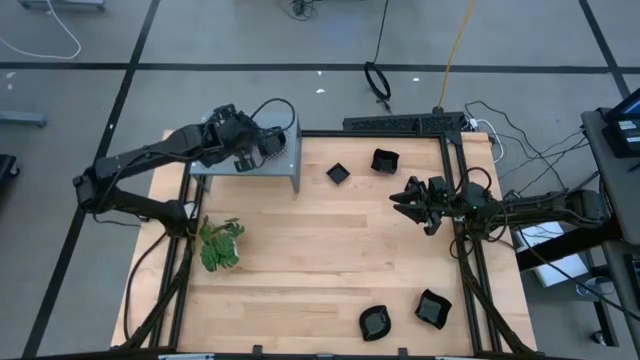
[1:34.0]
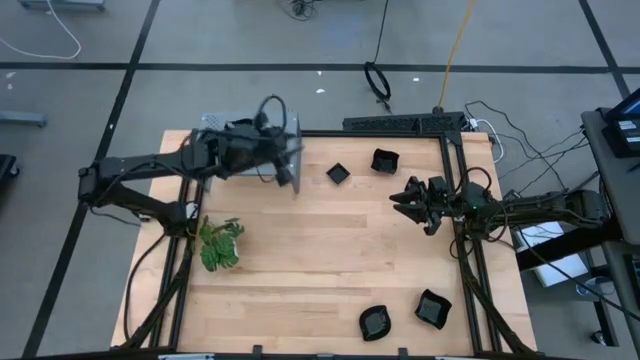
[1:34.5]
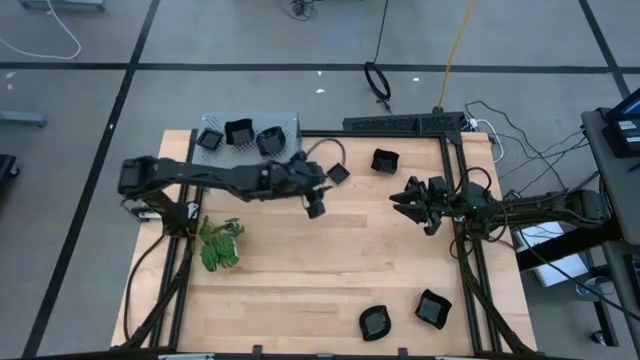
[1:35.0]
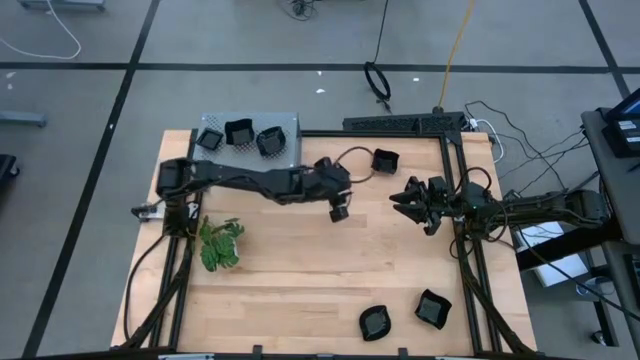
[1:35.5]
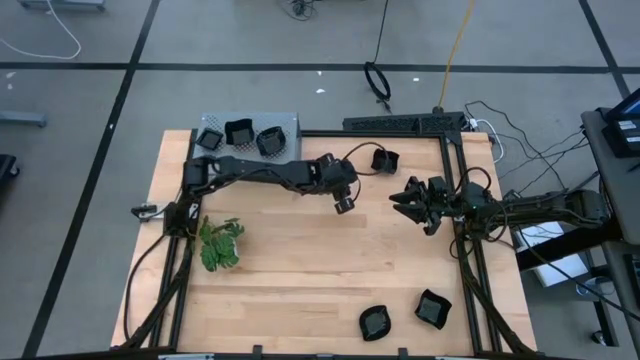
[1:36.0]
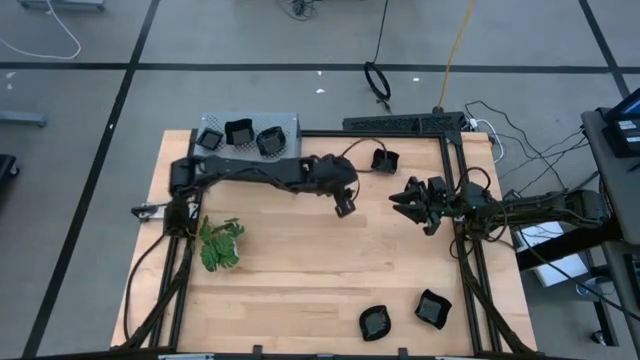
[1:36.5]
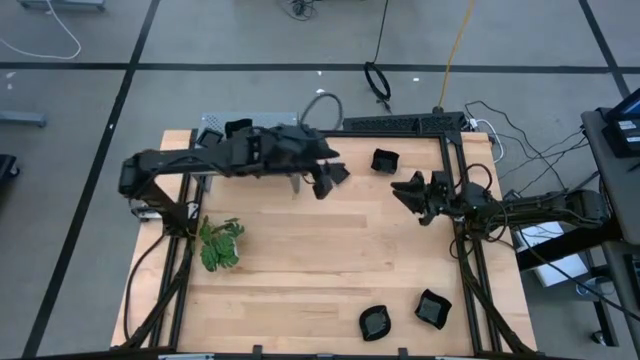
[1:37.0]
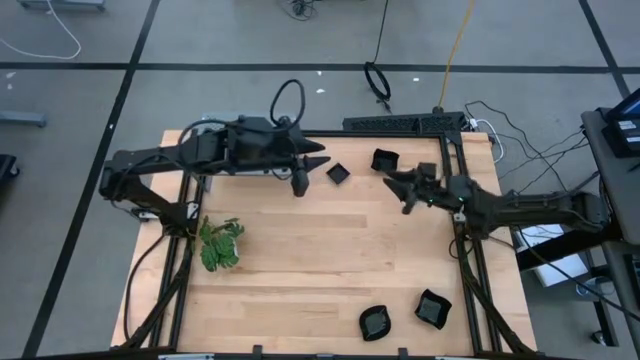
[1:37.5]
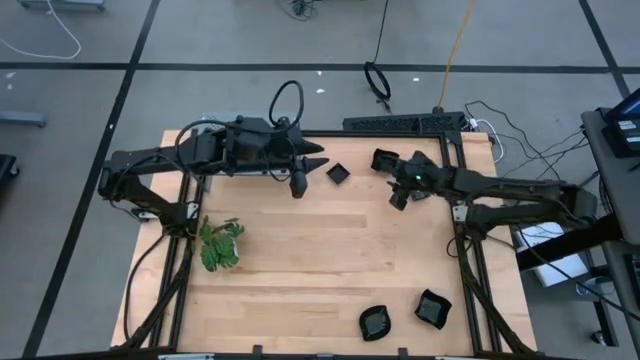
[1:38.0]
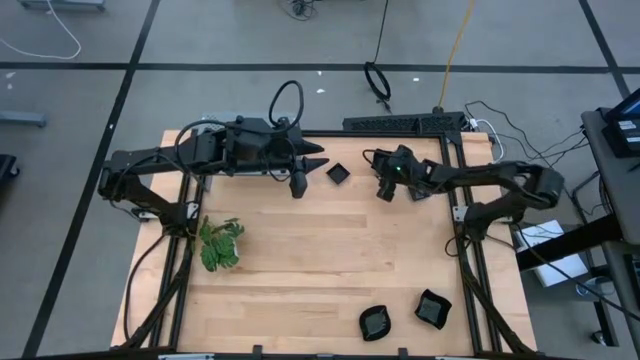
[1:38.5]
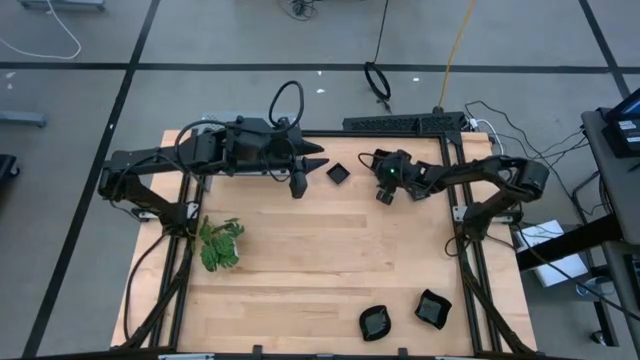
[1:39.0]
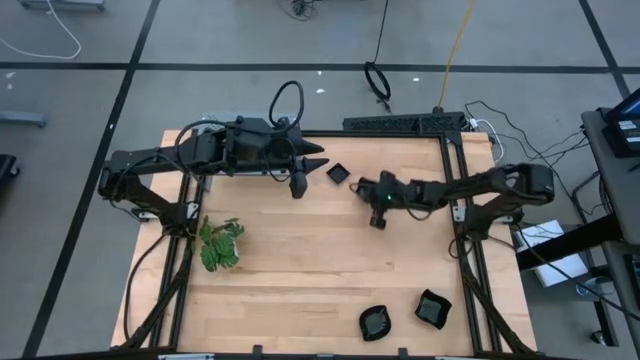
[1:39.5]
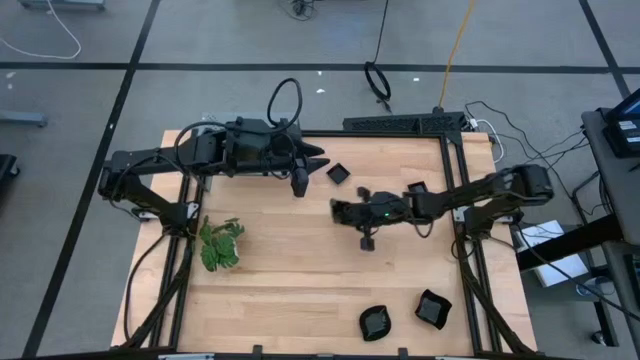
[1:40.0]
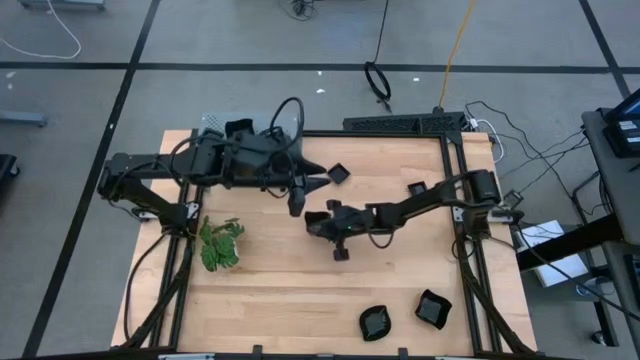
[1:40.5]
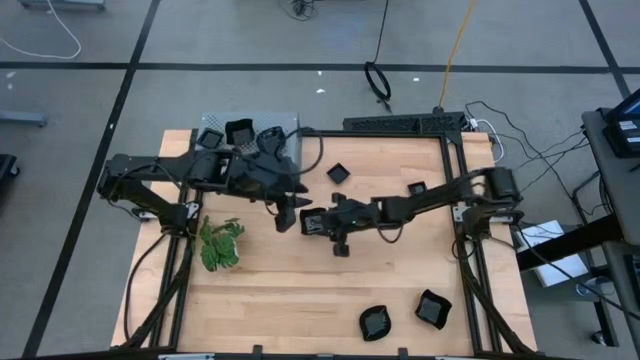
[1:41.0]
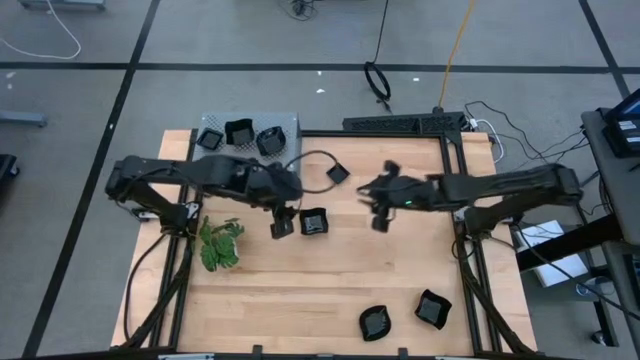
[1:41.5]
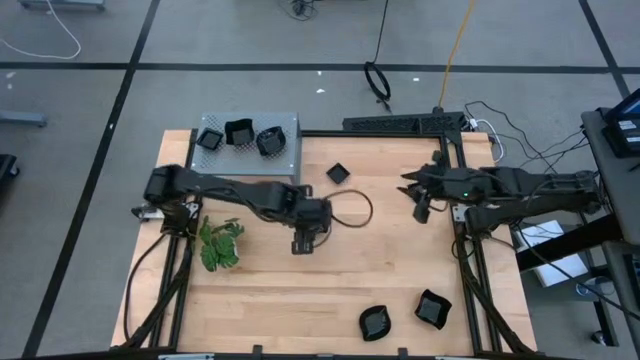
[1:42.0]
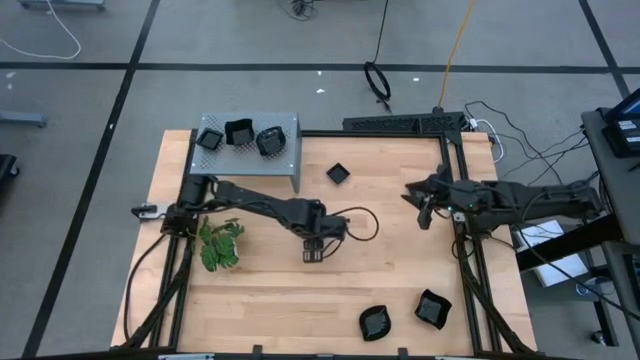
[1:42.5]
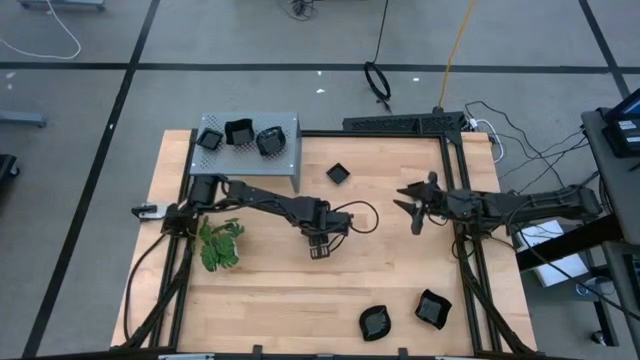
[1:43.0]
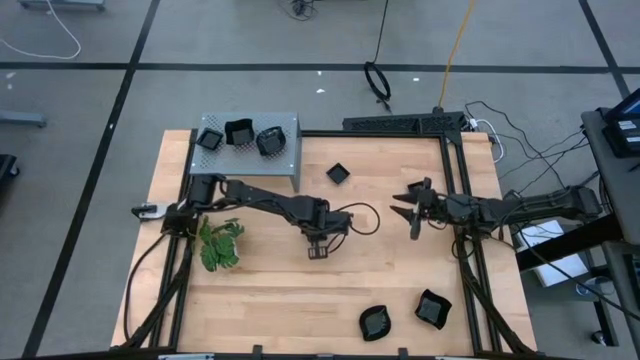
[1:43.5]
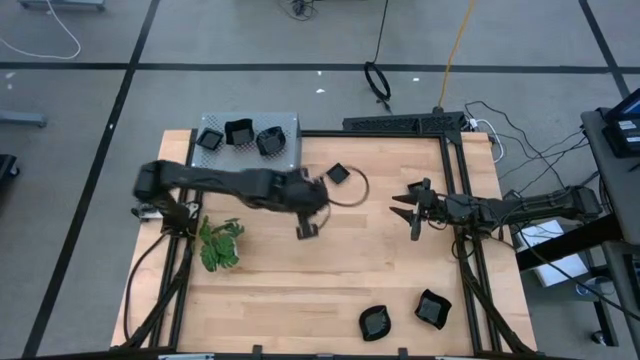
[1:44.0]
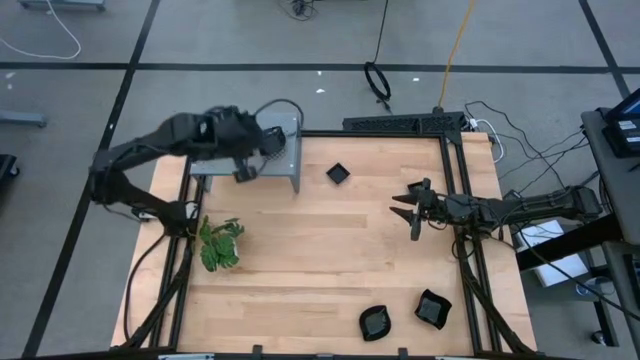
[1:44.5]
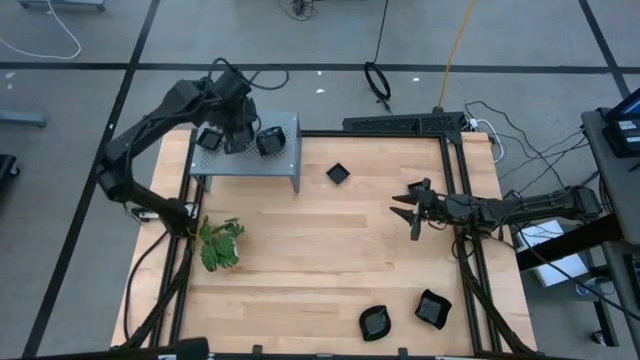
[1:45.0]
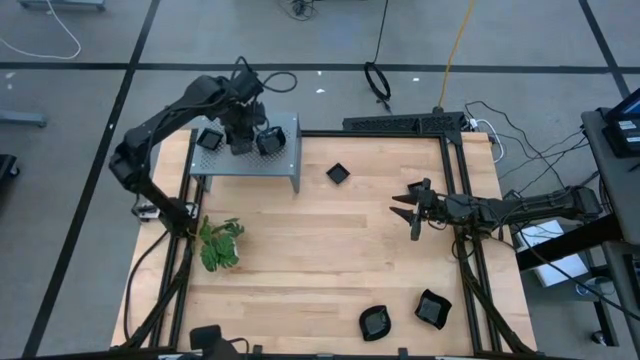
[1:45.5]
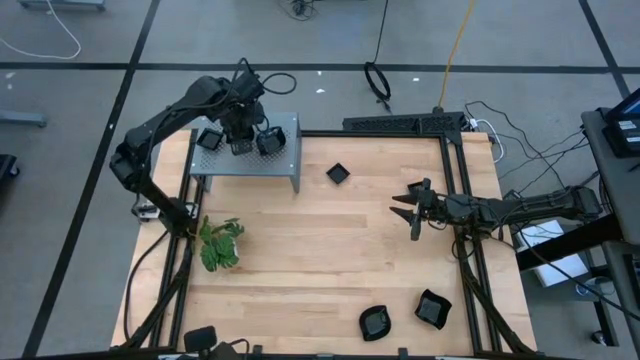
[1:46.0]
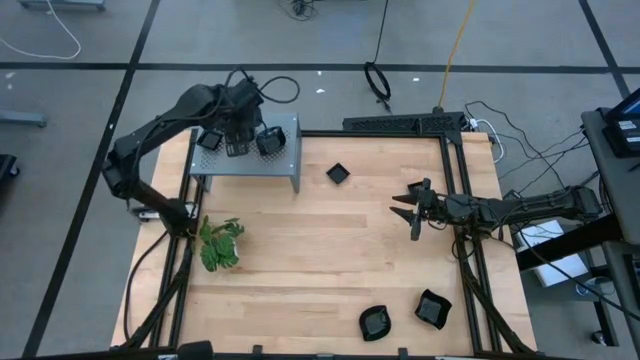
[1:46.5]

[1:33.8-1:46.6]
Task: Pick & Place Mini shaped plates
Stack the distorted square plate on top of the distorted square plate on the shelf

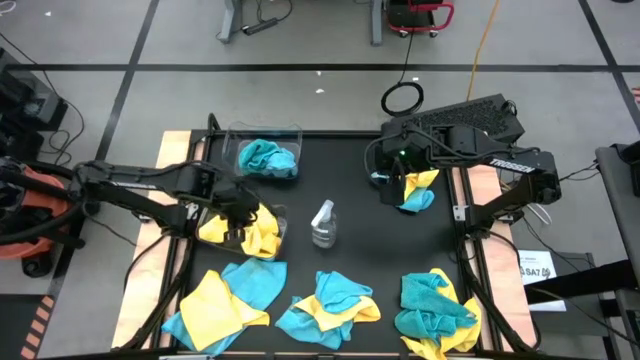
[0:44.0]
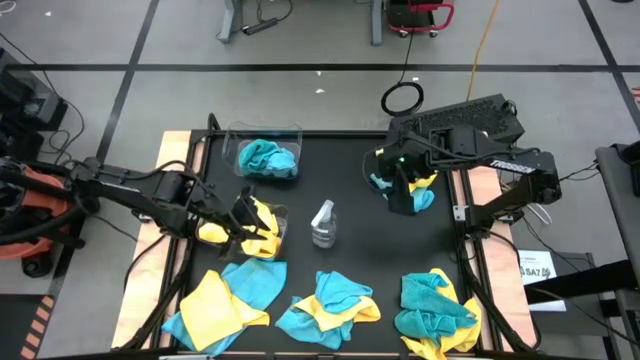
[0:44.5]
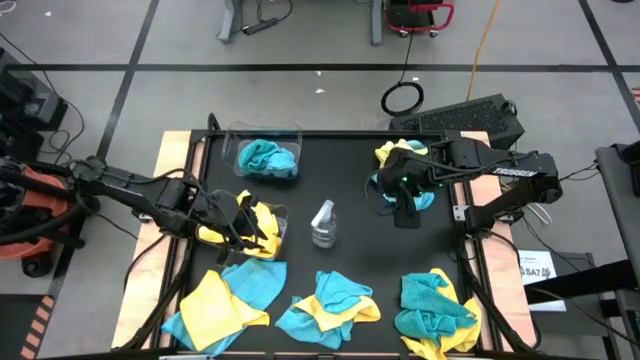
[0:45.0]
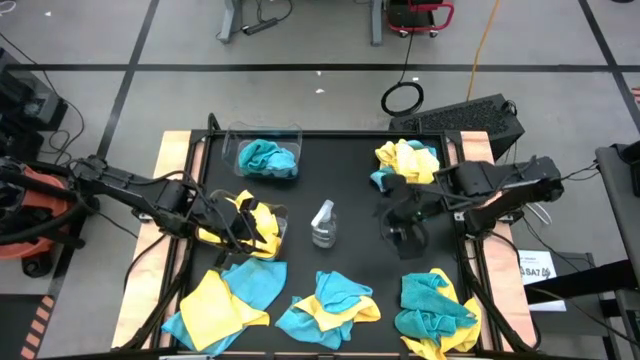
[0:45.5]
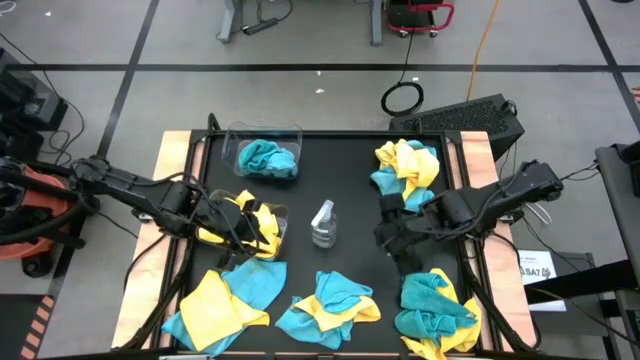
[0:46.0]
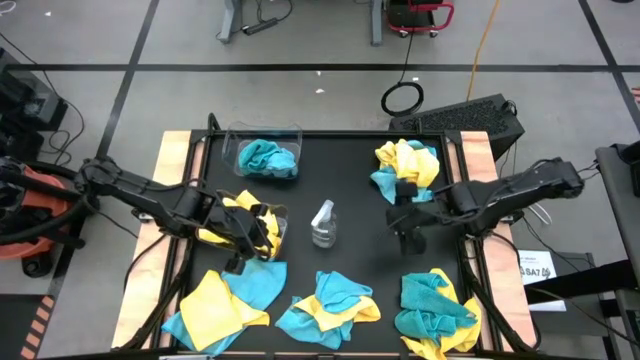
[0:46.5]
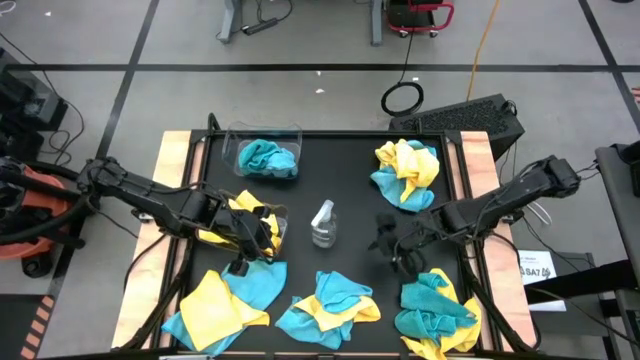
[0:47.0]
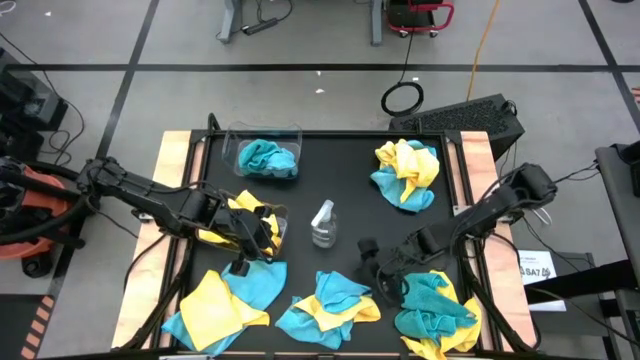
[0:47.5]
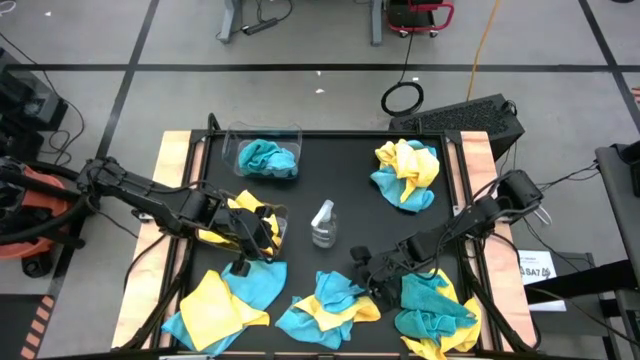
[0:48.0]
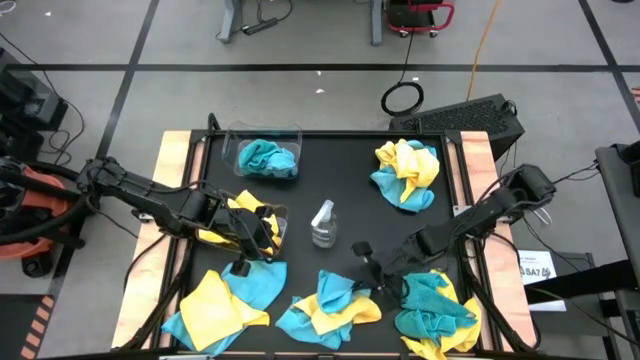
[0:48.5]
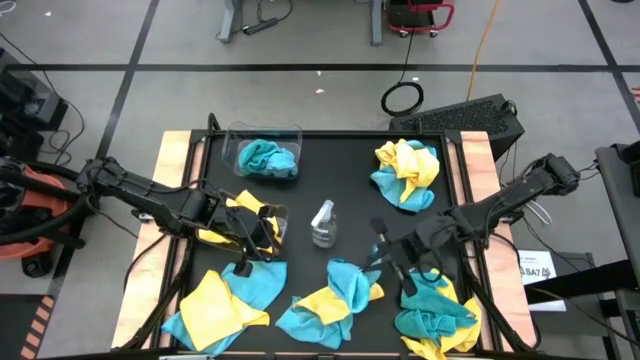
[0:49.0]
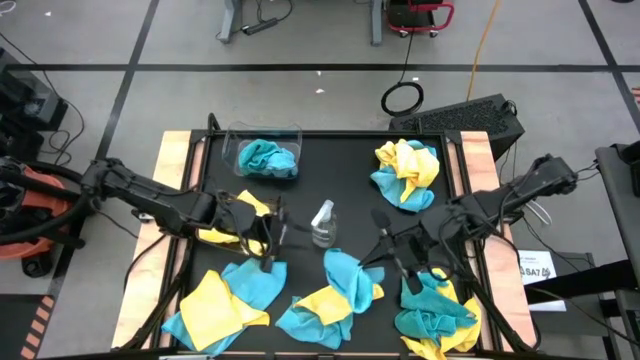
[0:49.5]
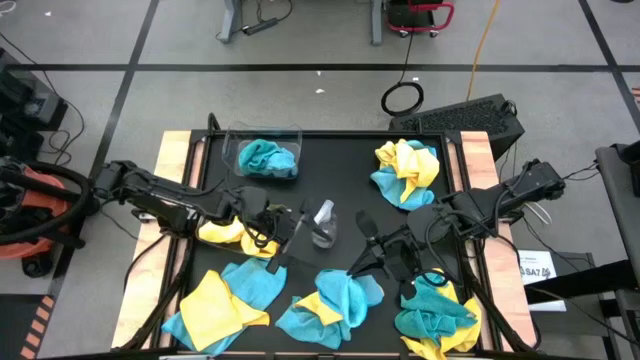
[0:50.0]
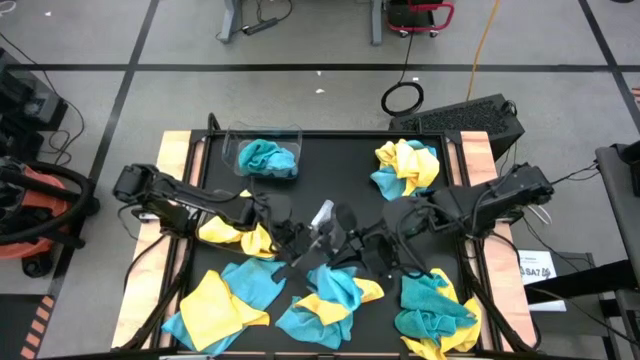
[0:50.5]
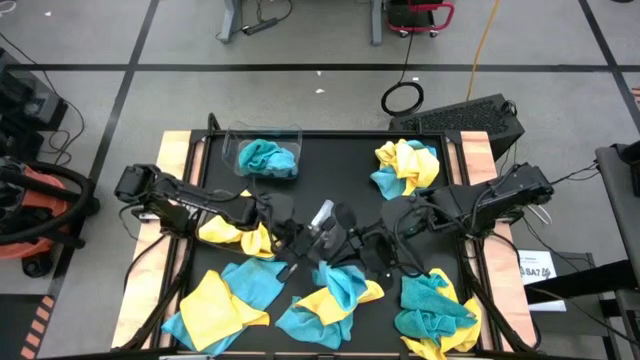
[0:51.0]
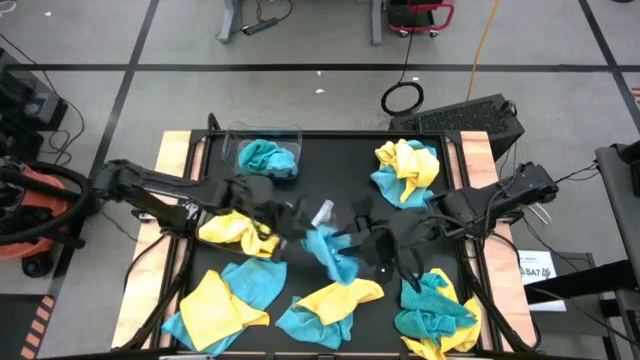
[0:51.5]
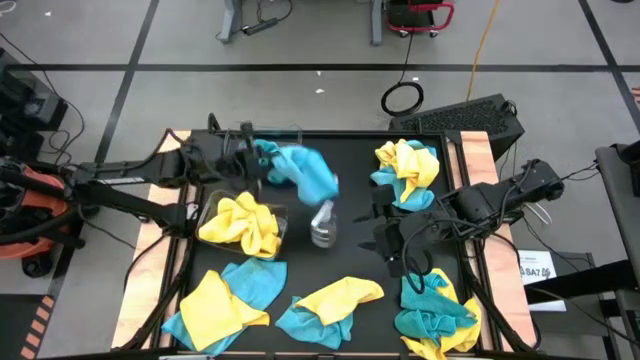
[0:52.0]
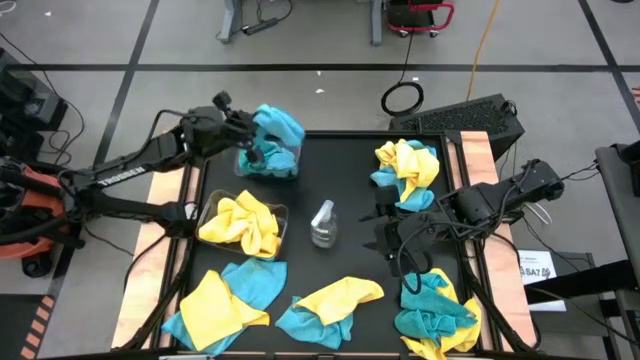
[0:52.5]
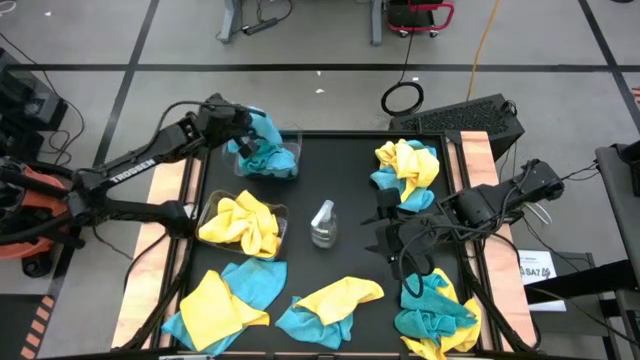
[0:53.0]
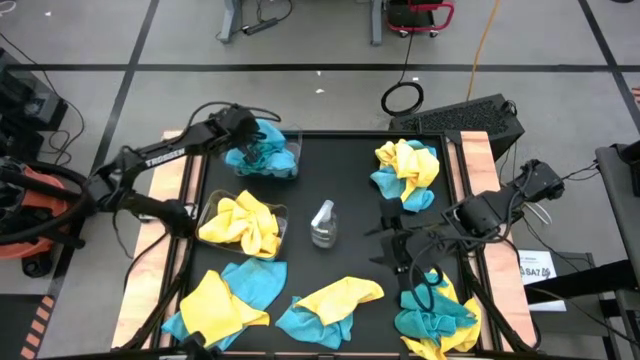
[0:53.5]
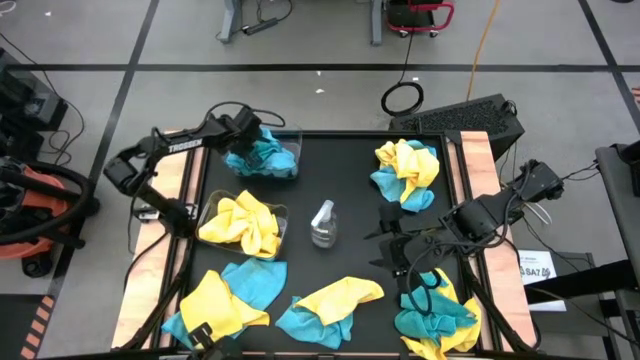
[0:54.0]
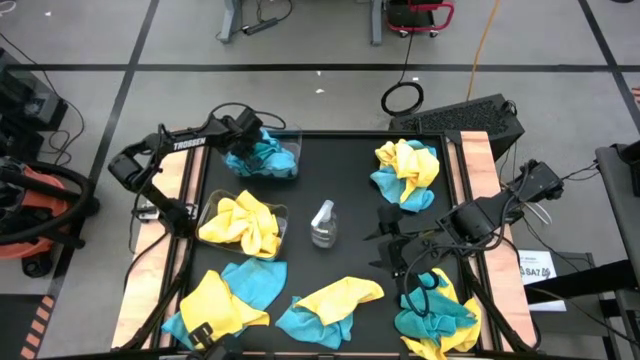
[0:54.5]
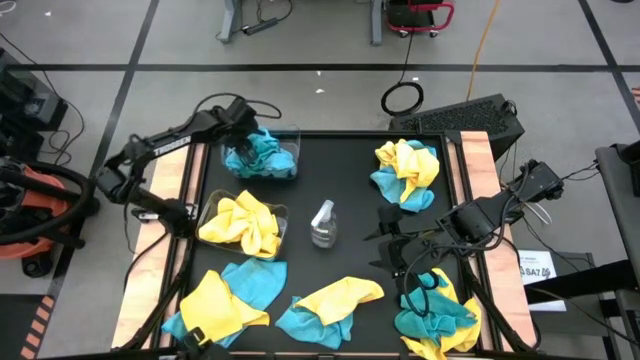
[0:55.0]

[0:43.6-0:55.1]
Task: Sort microfiber towel by color & place in baskets
Put the blue microfiber cloth into the top transparent bin
